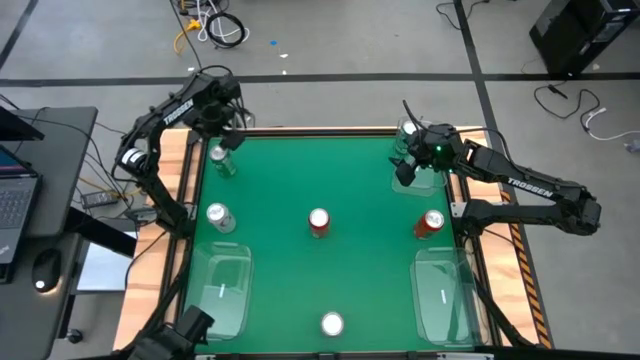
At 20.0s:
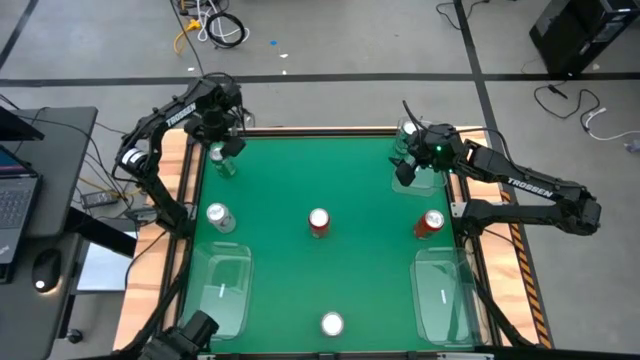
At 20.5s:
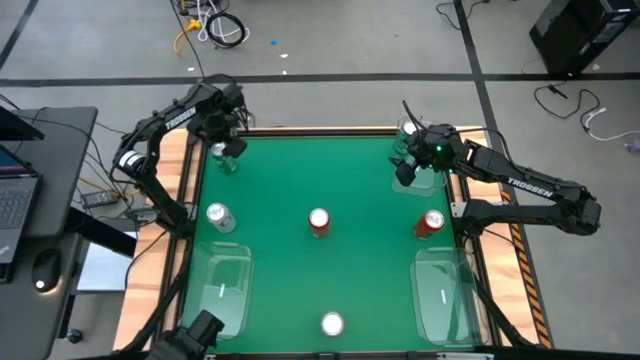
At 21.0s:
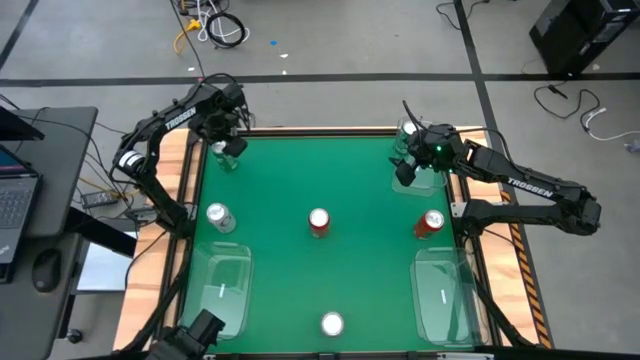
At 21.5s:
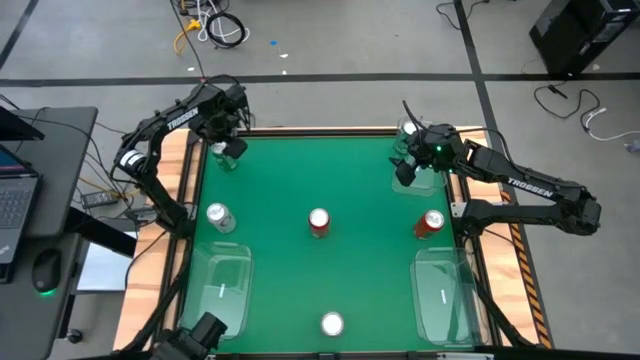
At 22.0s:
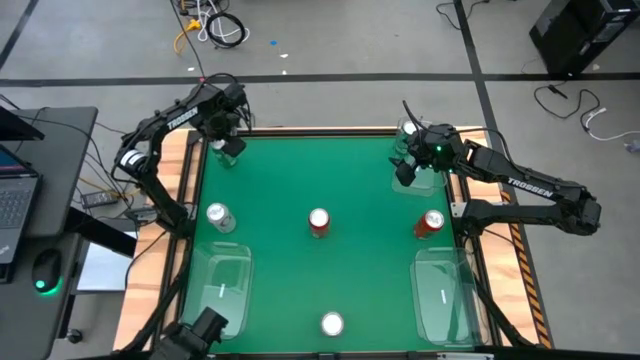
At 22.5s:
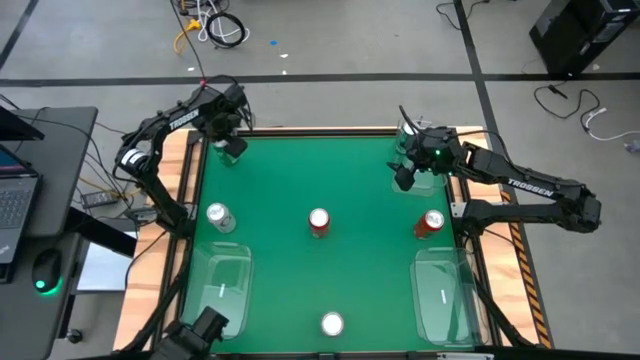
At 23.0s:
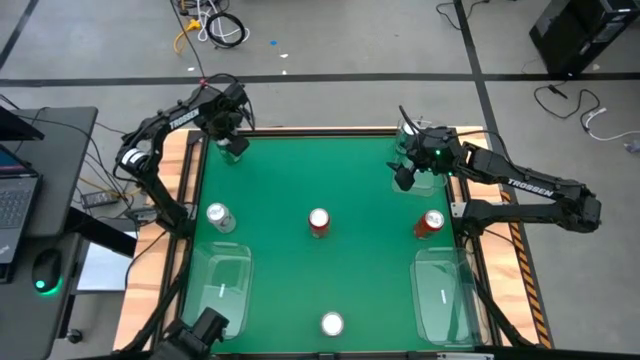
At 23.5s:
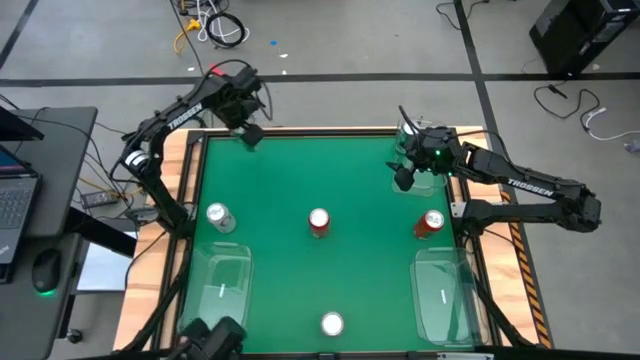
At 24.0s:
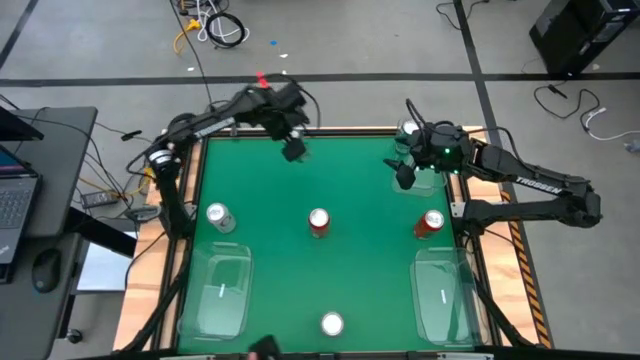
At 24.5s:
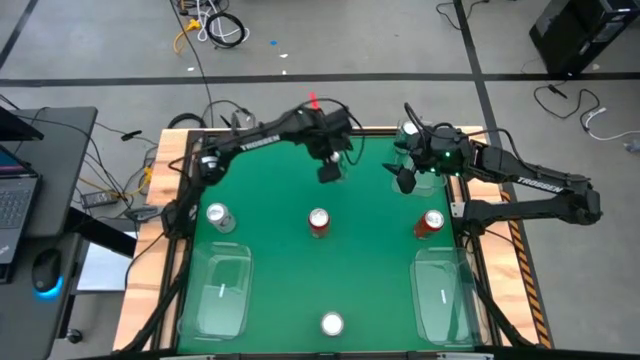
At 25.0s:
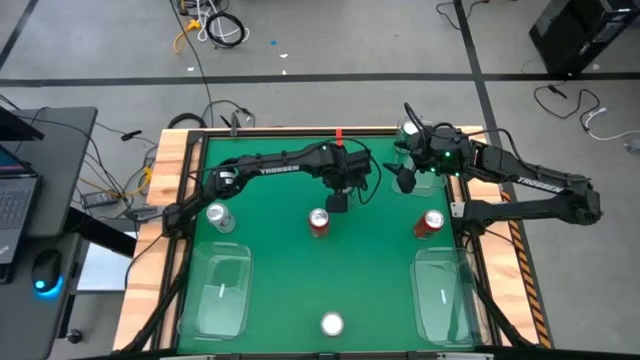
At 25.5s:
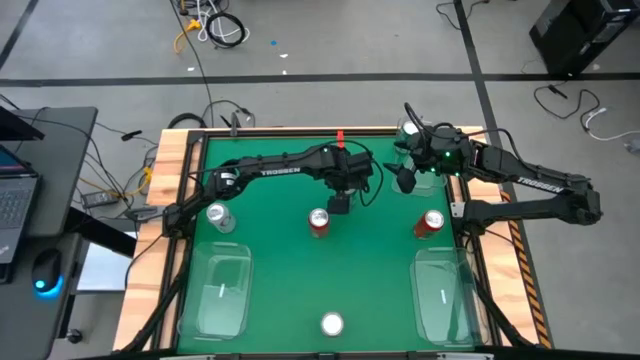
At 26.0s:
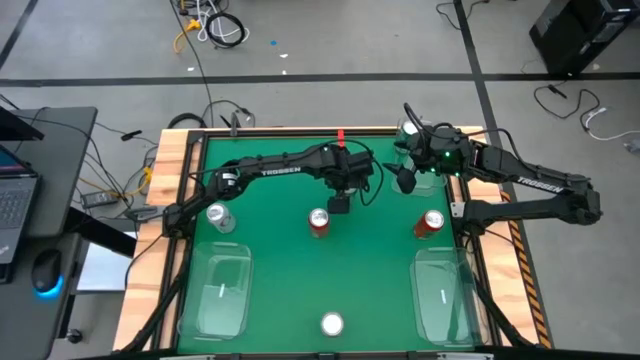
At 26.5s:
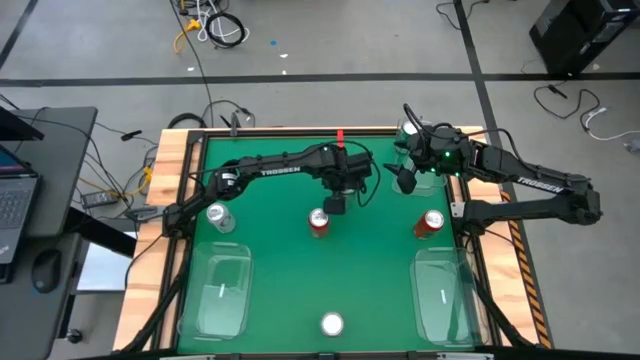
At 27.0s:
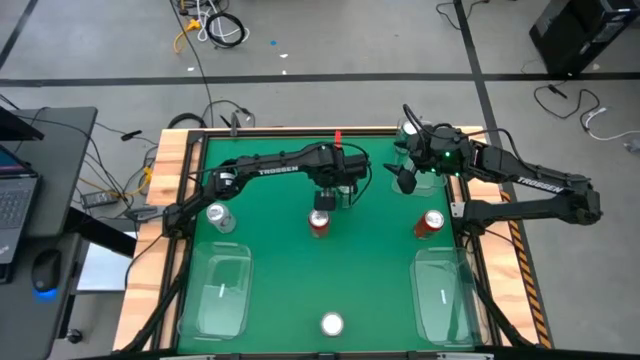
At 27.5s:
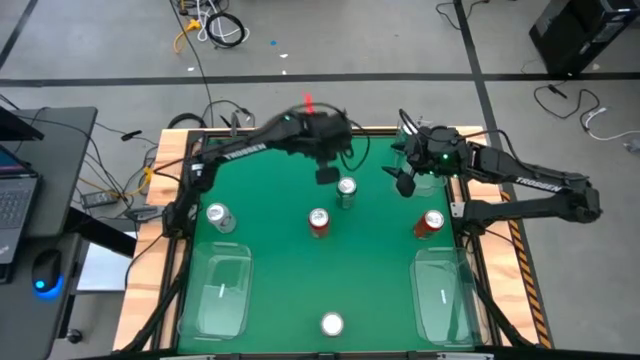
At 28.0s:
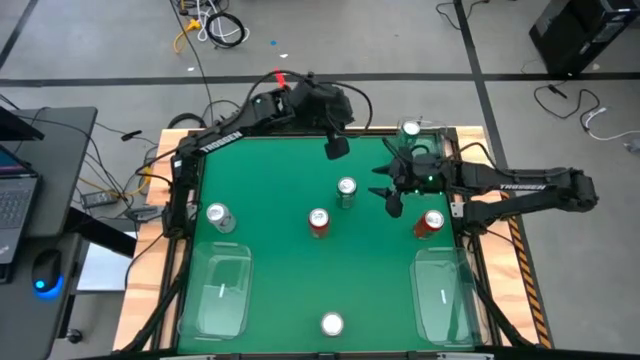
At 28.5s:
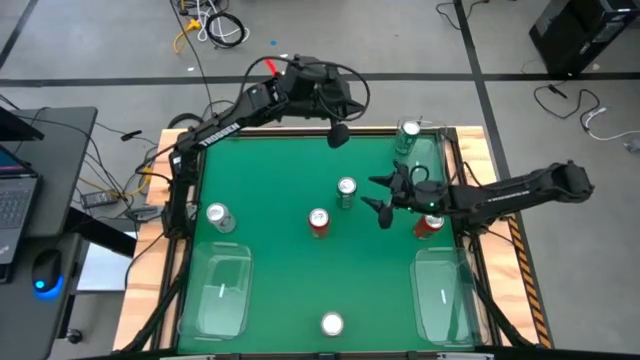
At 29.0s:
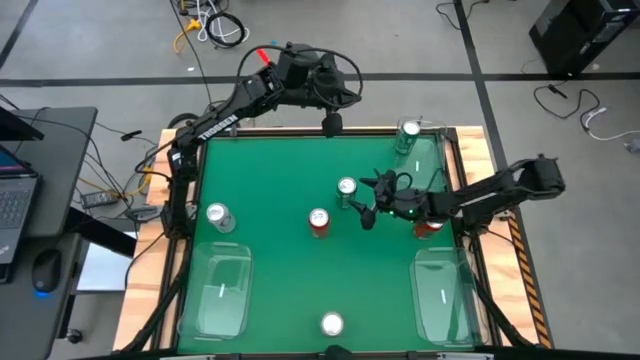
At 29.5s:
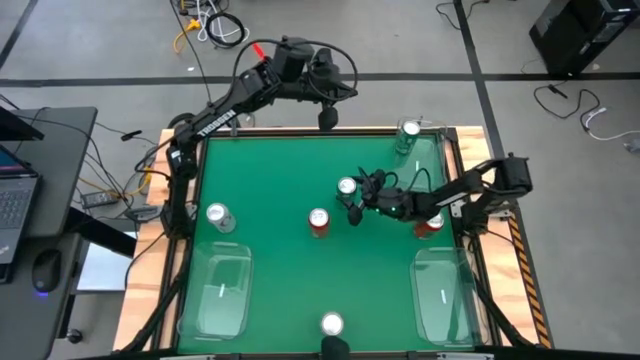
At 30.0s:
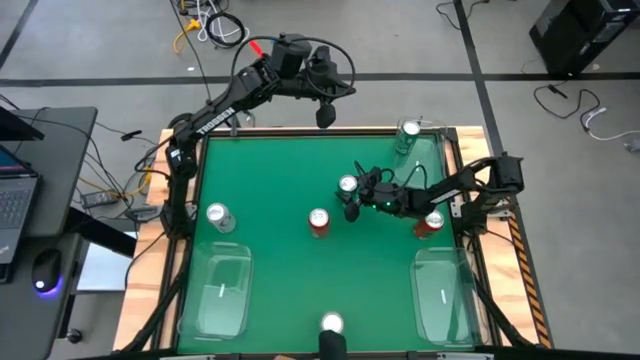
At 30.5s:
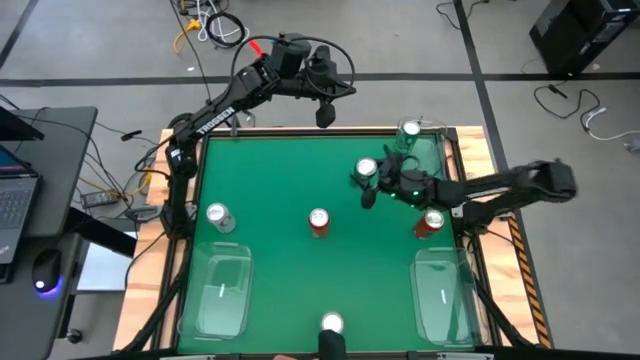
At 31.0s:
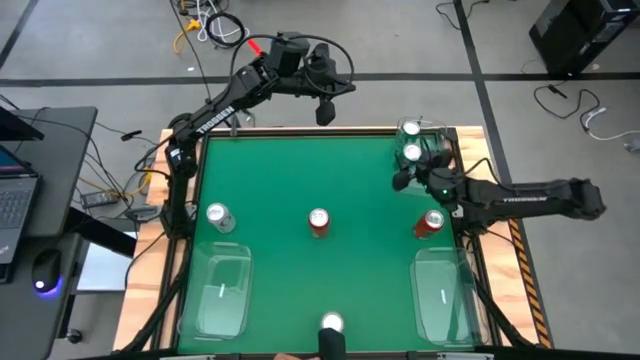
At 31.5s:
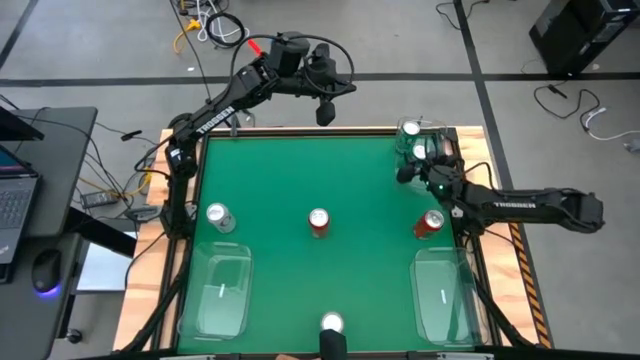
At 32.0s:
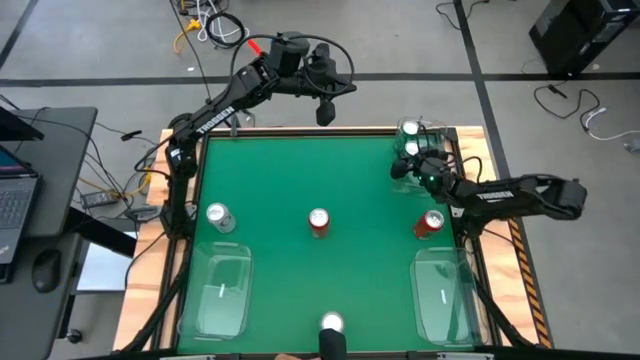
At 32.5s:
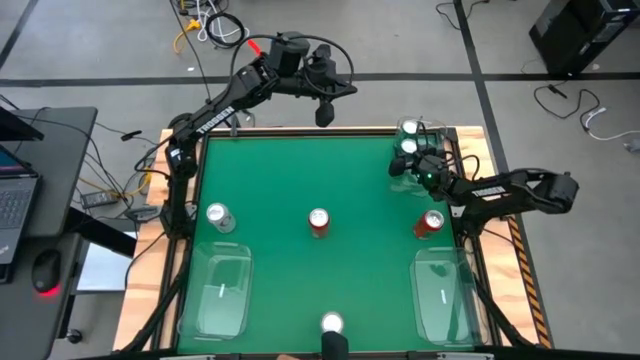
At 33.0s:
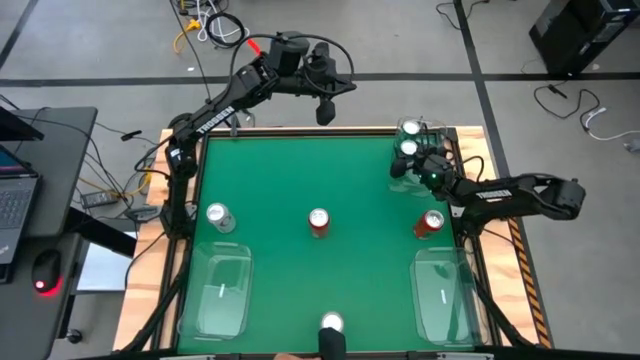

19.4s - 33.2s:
Task: Sort soda cans
Put the left green soda can into the top transparent bin

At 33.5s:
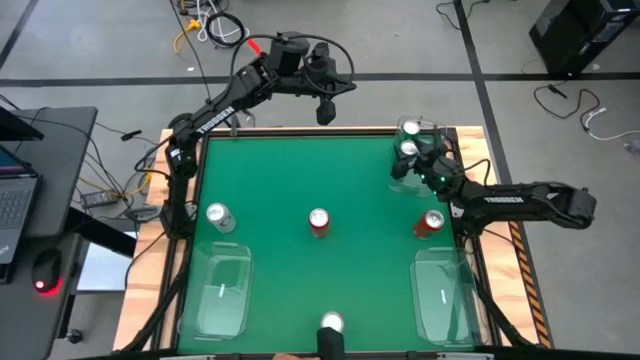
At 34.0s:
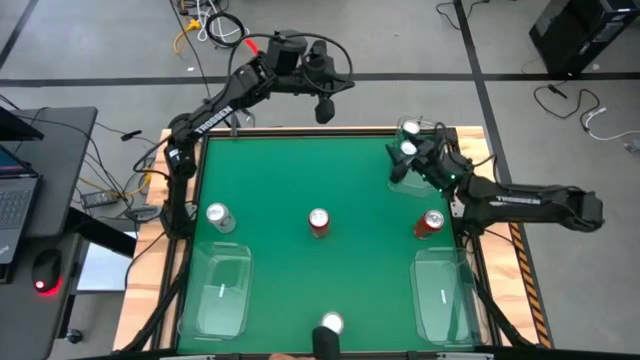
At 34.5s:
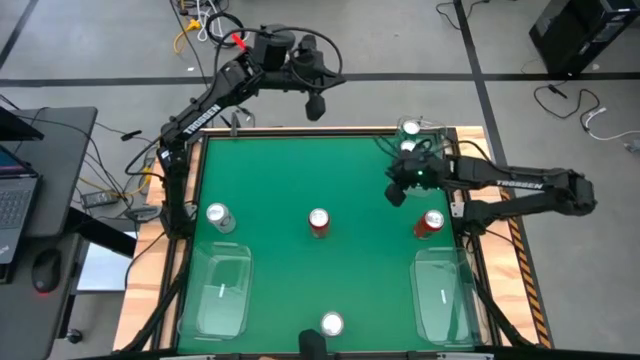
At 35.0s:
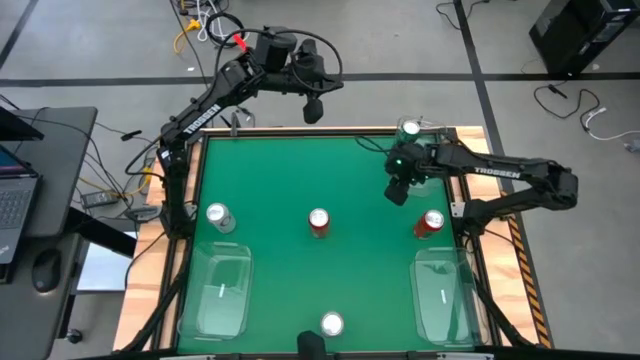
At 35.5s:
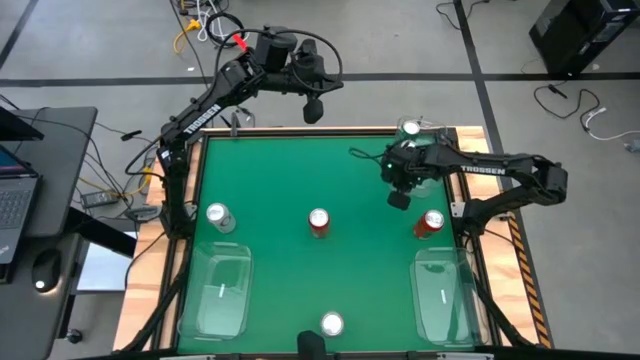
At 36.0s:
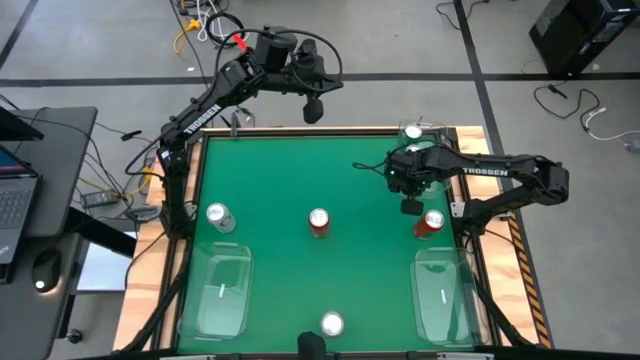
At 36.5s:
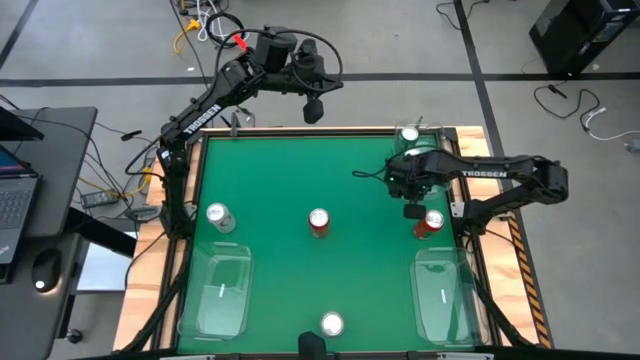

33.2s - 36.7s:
Adjust the top transparent bin

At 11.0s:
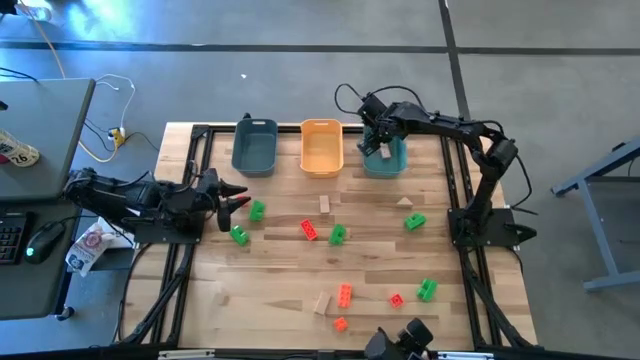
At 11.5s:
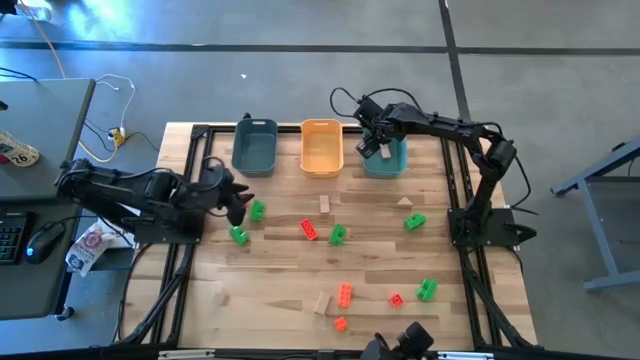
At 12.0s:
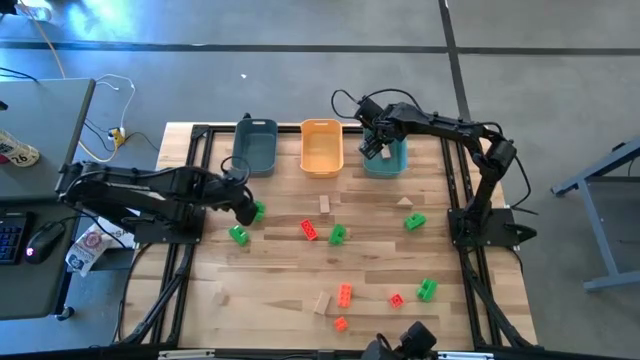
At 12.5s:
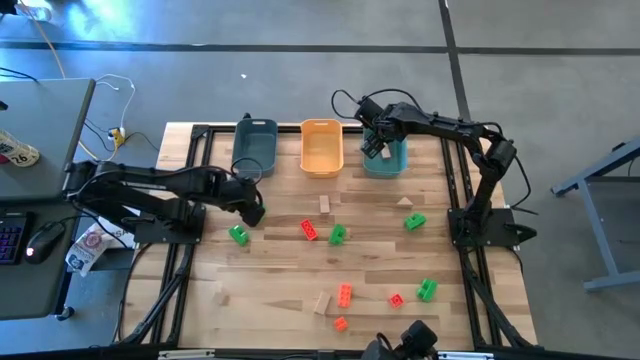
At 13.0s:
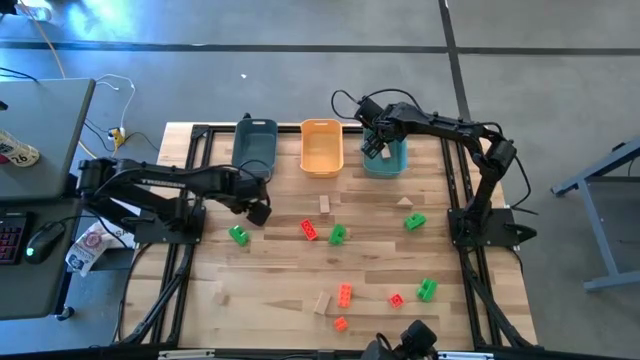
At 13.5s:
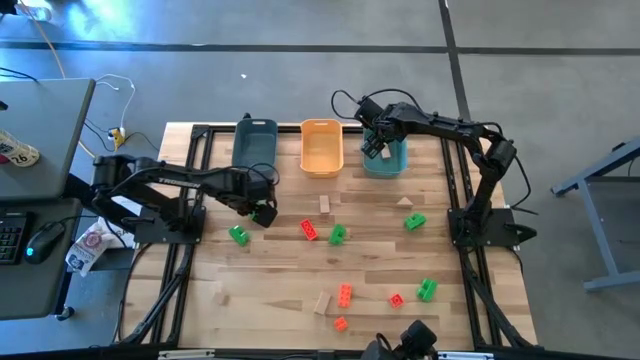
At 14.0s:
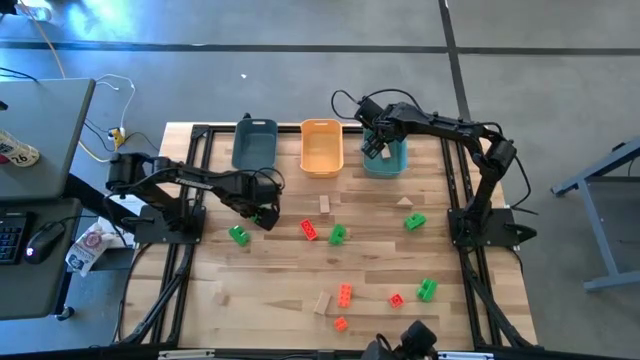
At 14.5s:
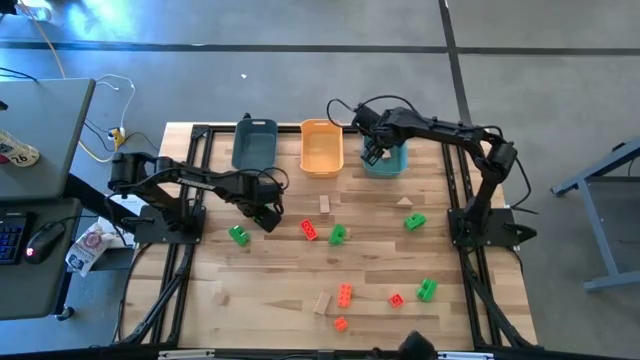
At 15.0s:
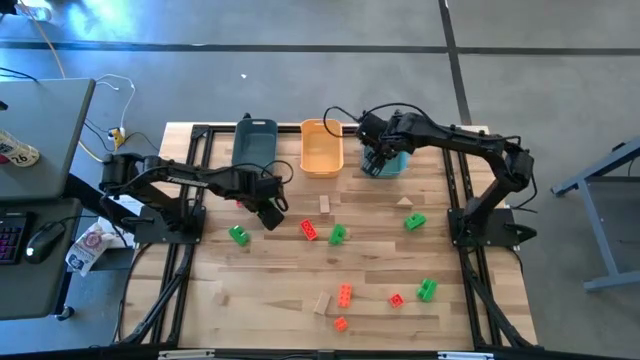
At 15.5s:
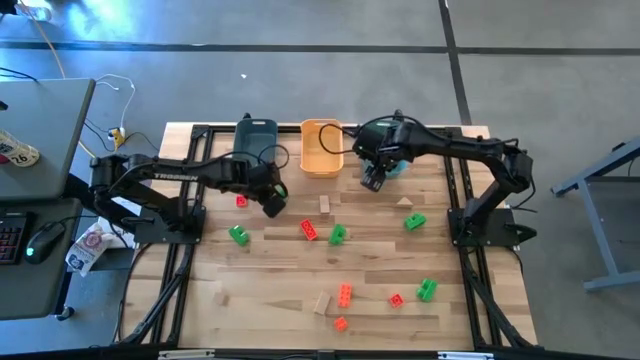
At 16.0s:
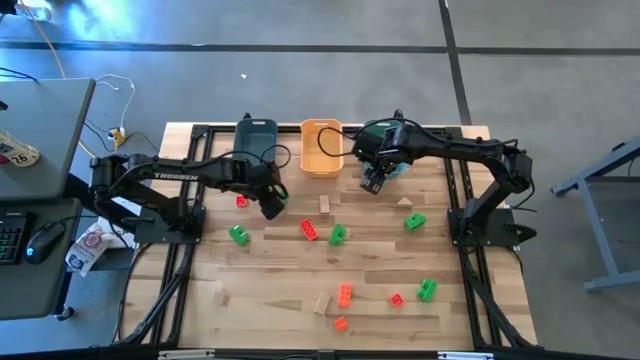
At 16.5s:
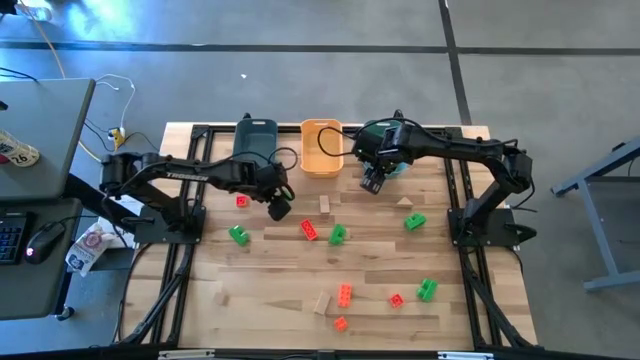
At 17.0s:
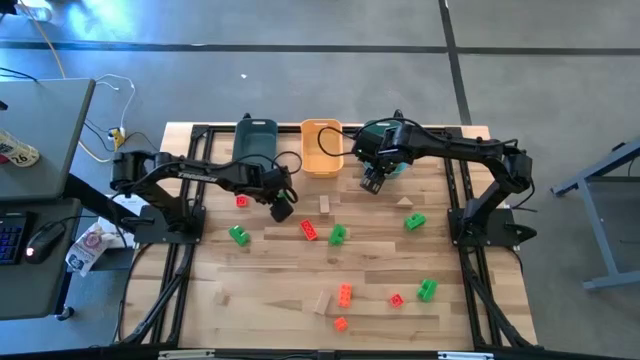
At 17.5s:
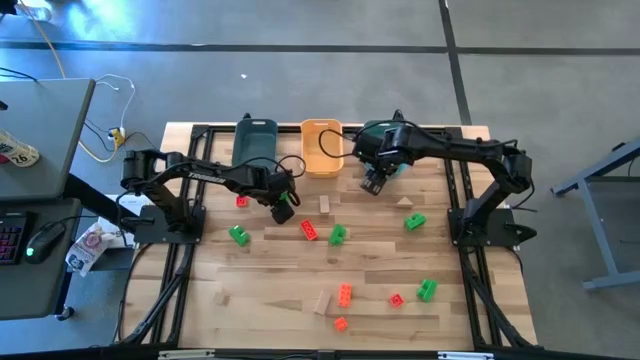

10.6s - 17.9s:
Task: Sort & place blocks by color
Put the green game piece into the dark blue bin
